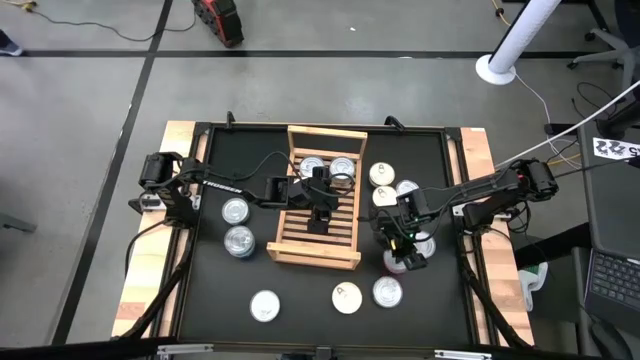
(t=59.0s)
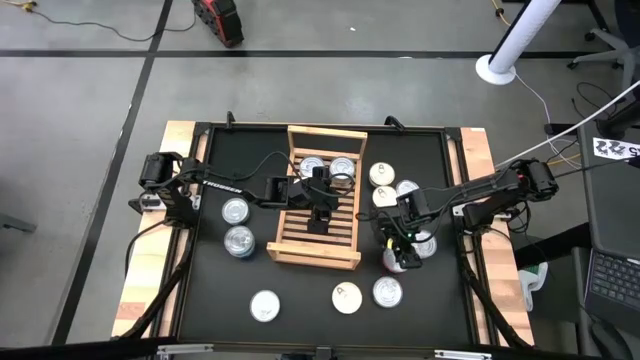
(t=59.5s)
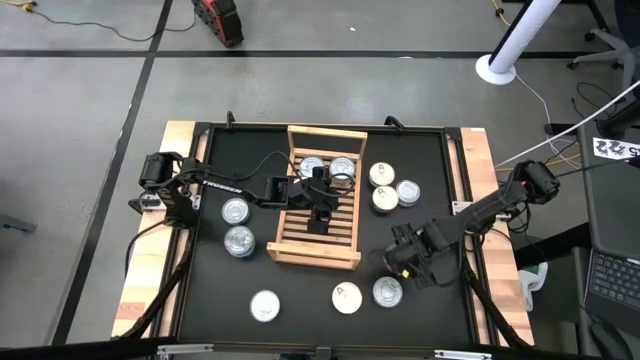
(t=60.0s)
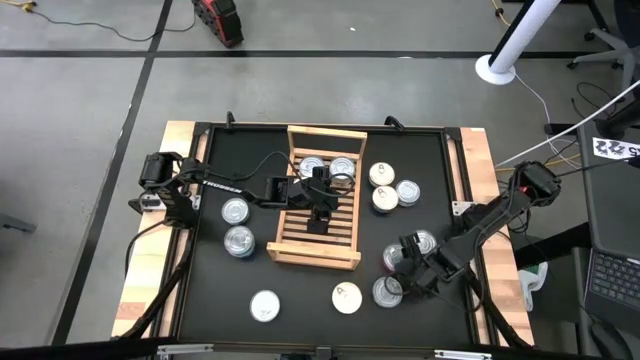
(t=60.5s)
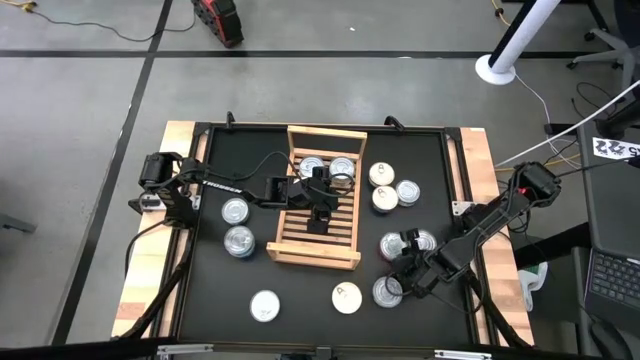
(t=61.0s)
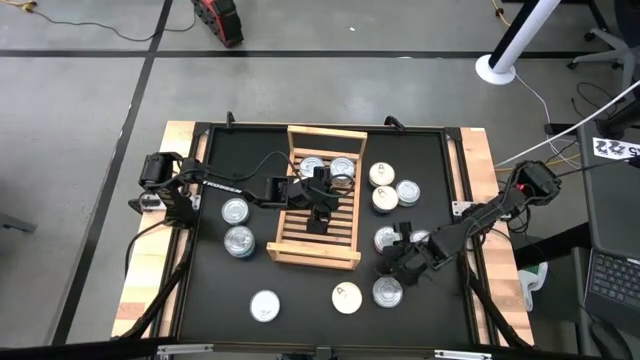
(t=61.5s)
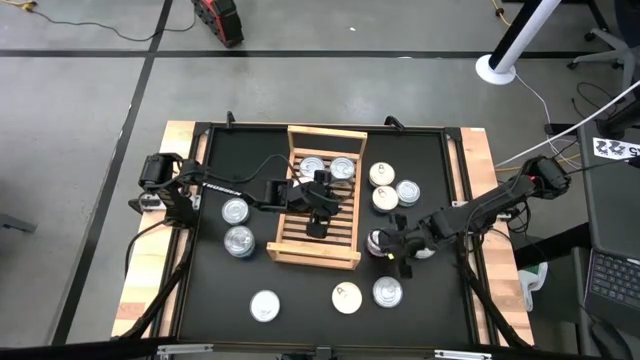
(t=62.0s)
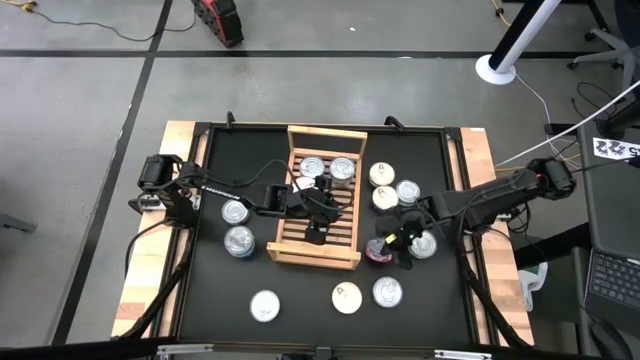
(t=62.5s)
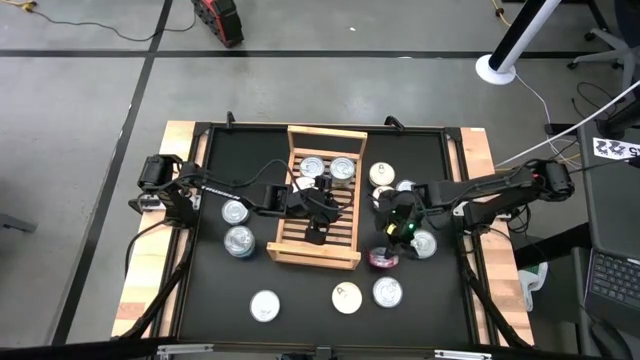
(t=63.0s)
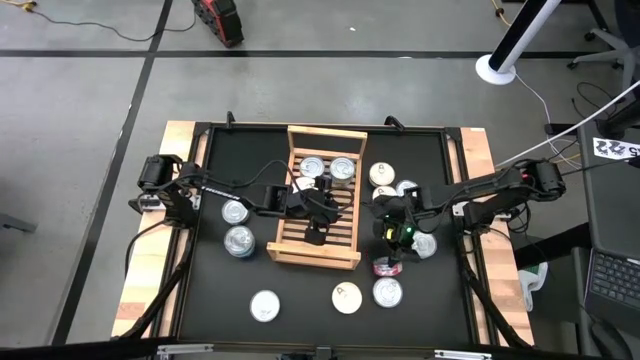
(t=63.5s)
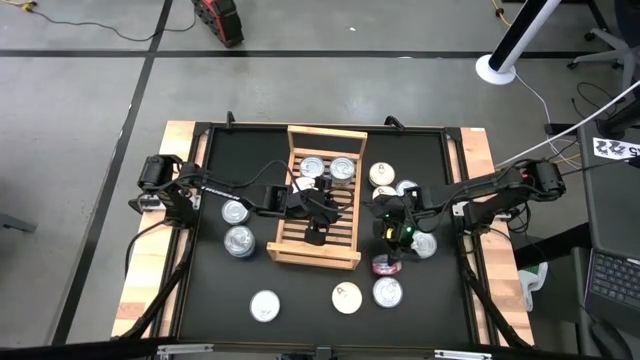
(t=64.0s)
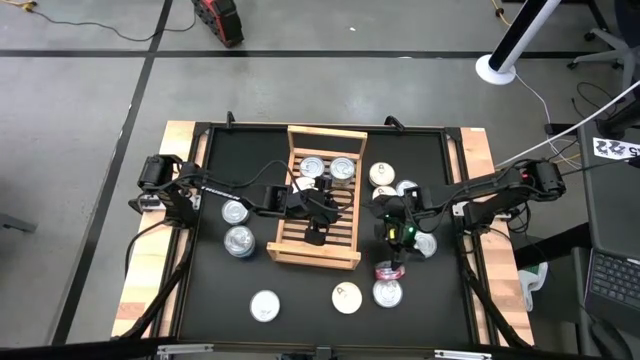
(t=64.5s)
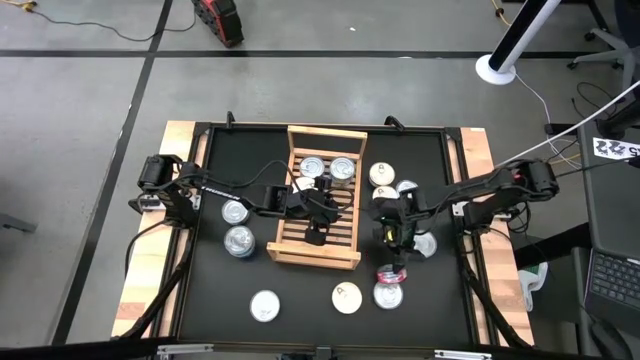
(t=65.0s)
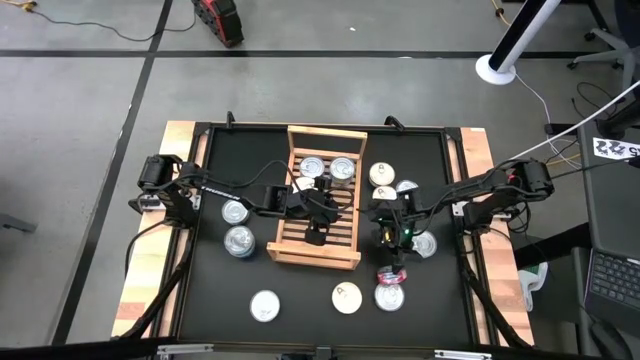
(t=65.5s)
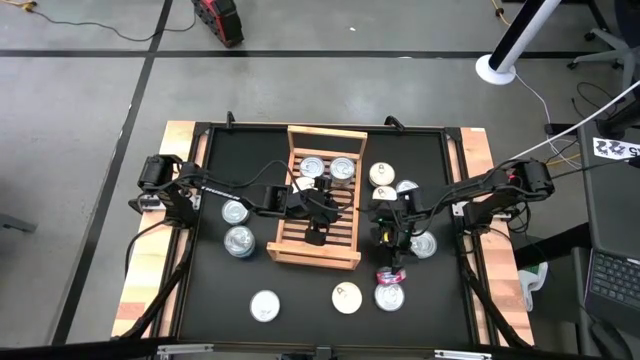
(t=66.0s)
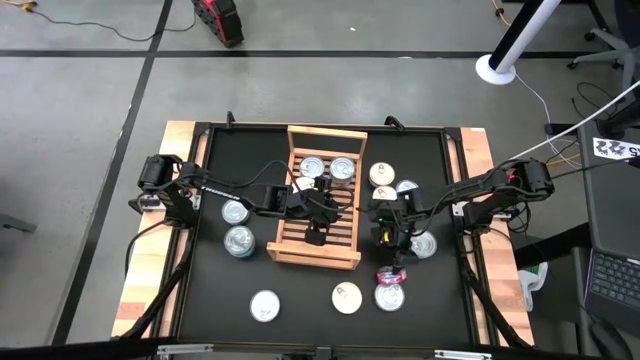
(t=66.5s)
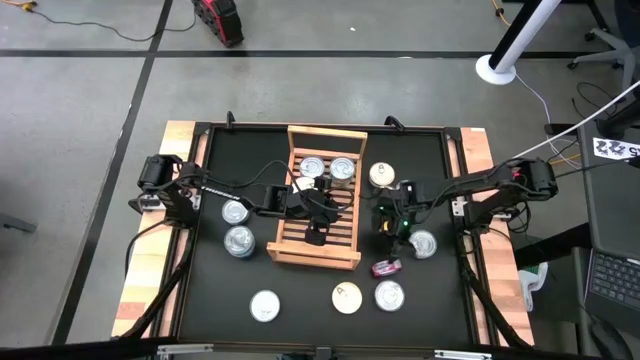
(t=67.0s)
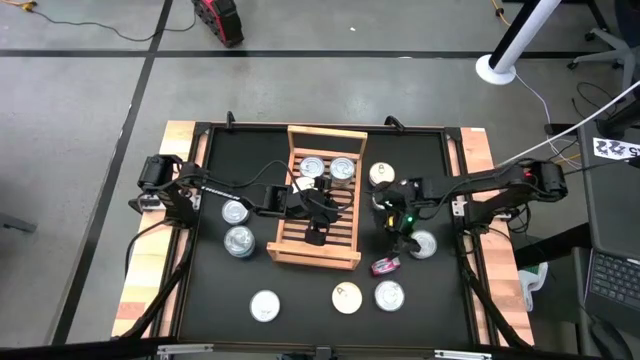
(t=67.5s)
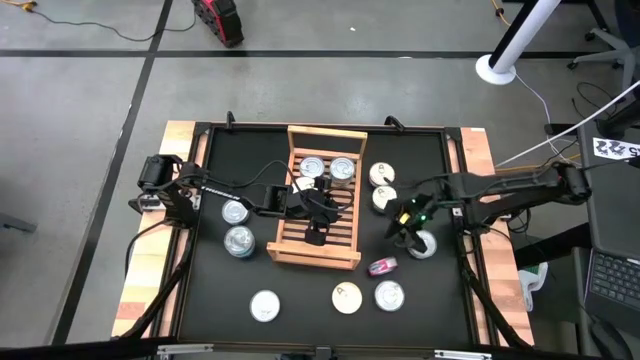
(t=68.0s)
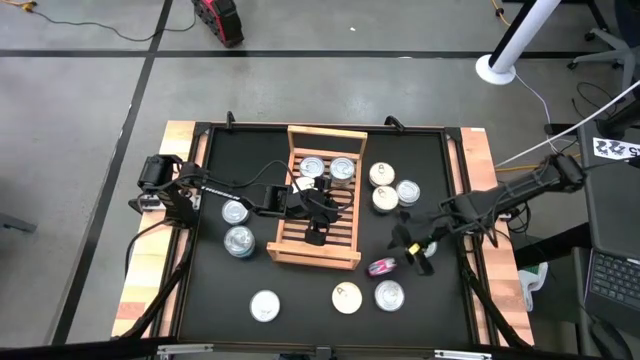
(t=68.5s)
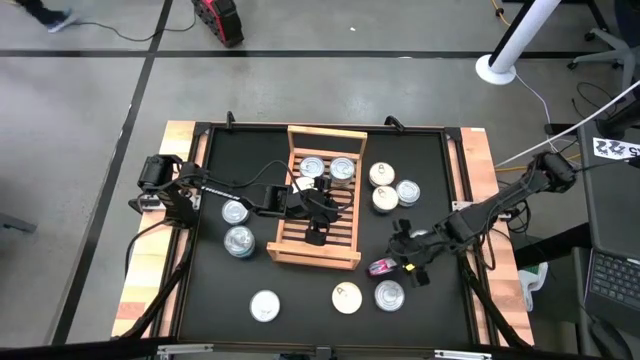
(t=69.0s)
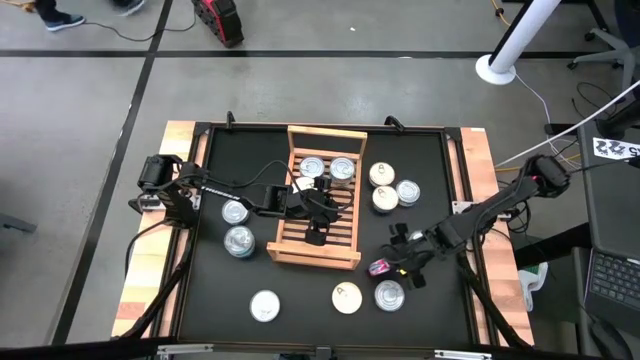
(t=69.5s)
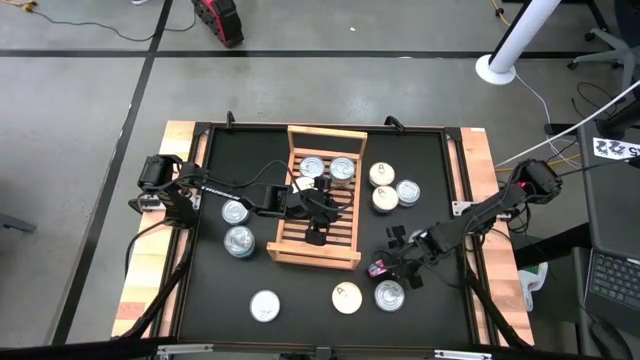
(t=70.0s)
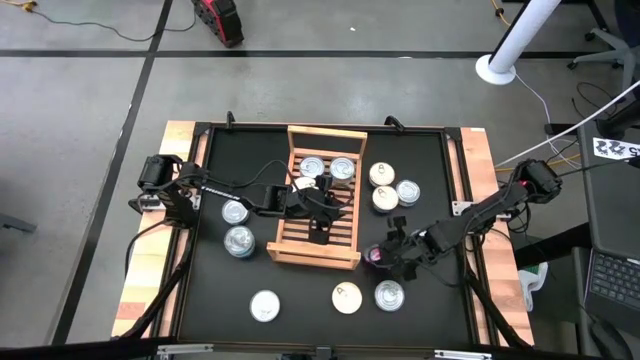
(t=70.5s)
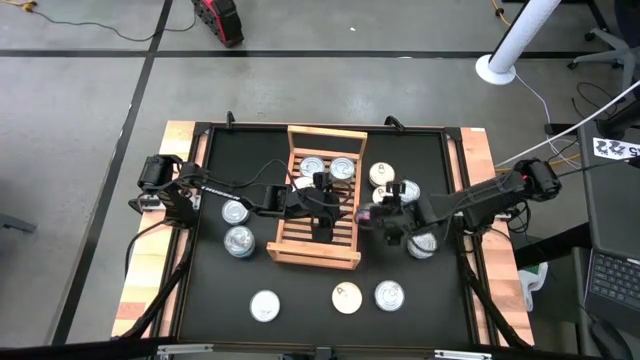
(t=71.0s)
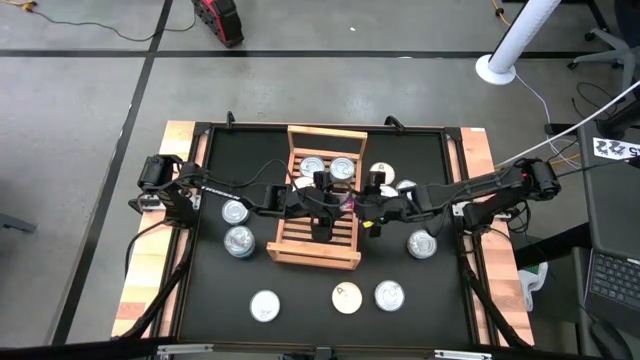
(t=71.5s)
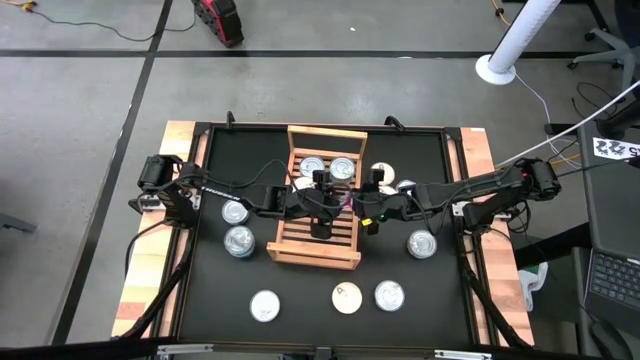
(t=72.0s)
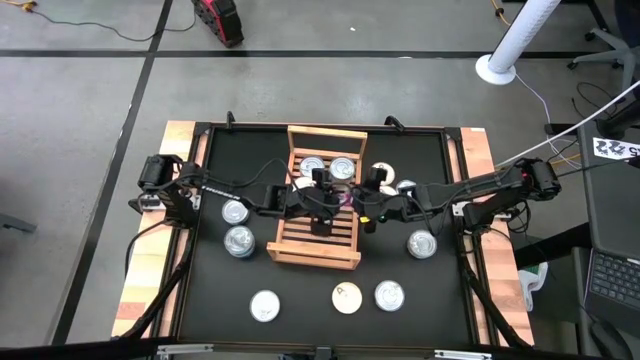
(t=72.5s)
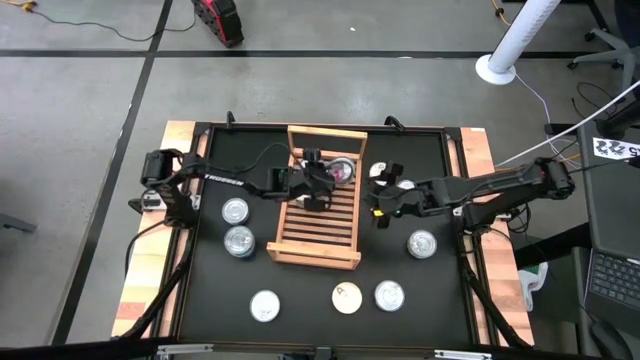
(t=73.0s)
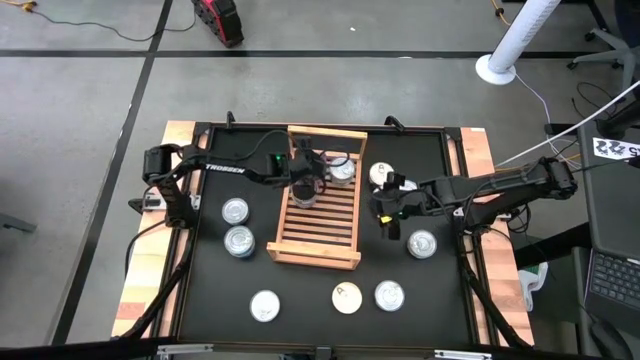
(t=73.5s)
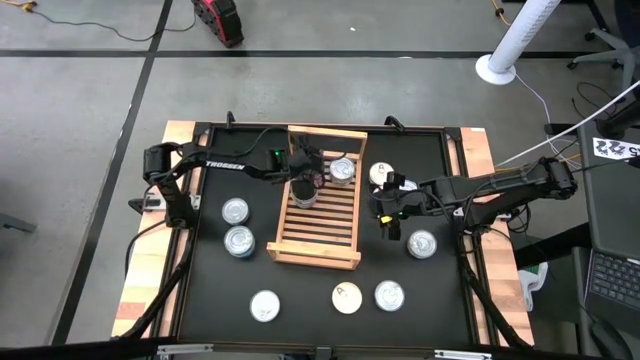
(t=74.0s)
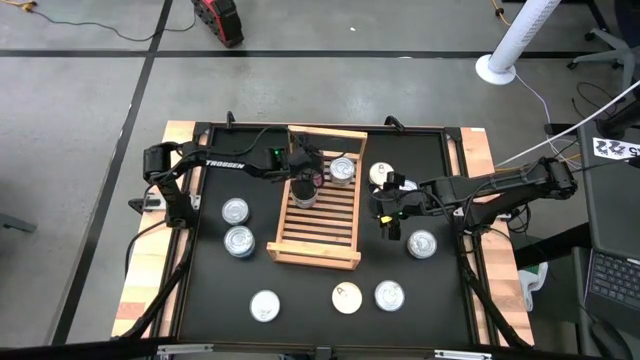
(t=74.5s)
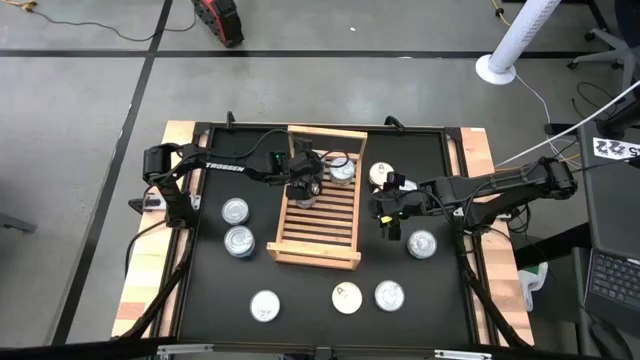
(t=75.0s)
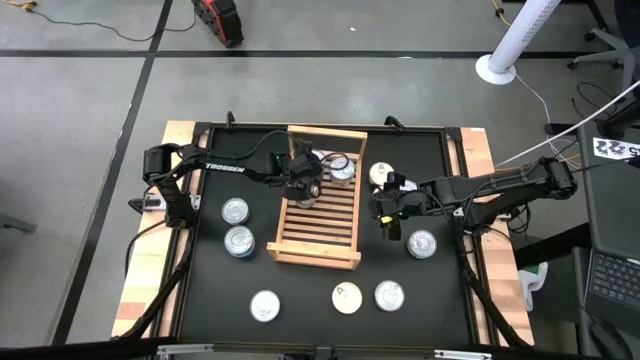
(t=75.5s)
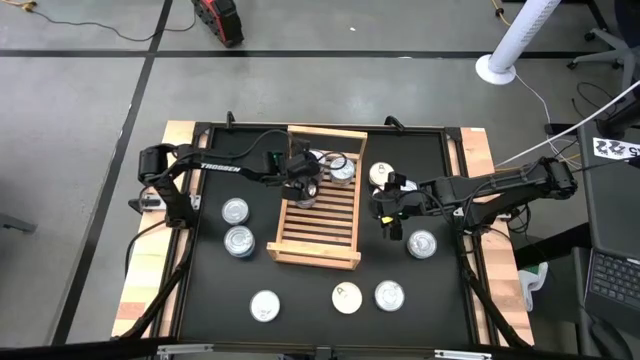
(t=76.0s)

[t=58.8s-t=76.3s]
Task: Stack canned seafood by type on shelf
Stack the red tuna can on top of the other red tuna cans on the shelf

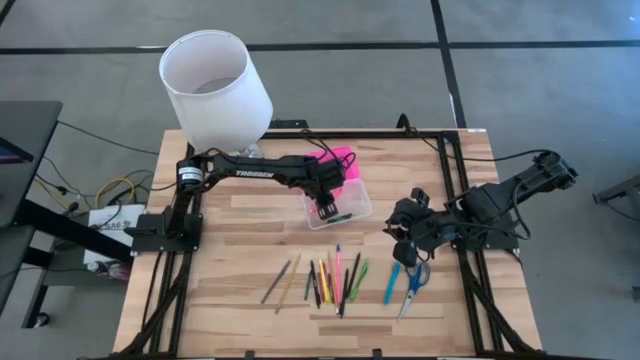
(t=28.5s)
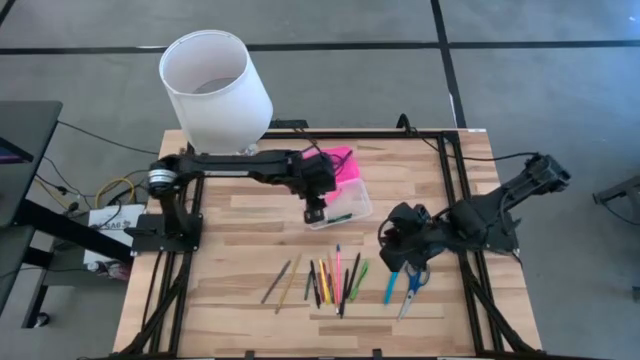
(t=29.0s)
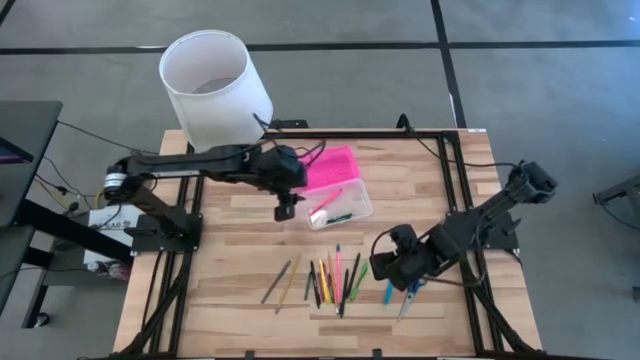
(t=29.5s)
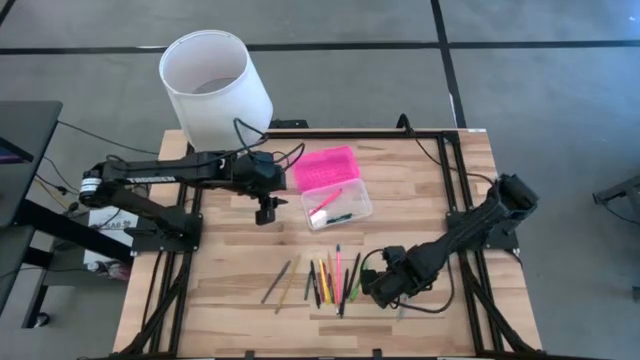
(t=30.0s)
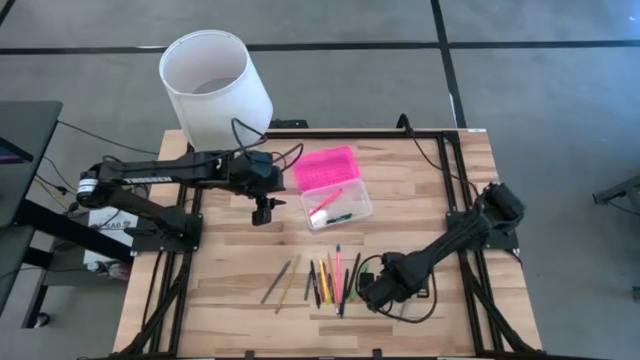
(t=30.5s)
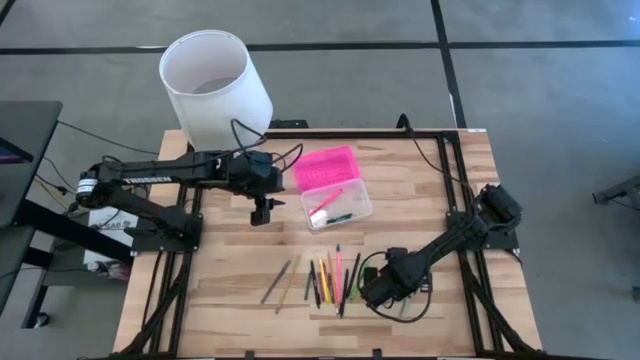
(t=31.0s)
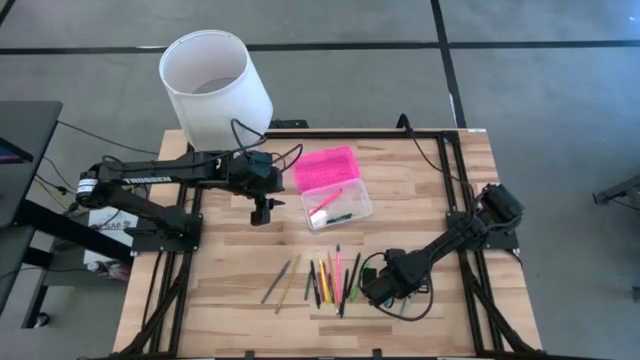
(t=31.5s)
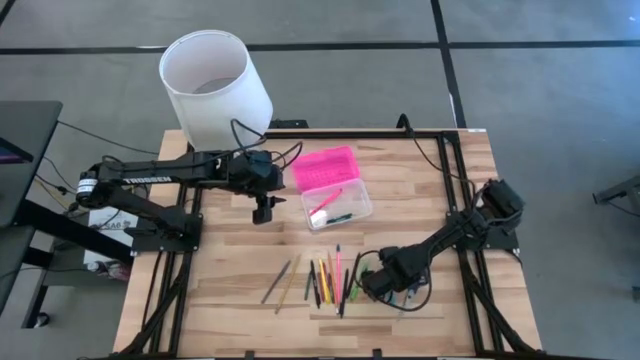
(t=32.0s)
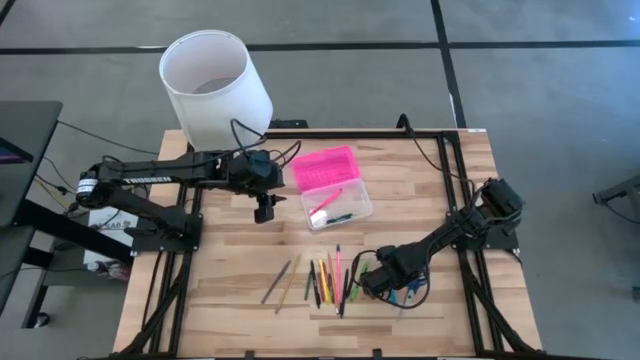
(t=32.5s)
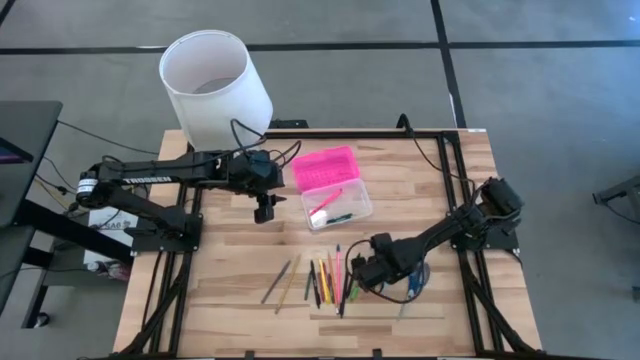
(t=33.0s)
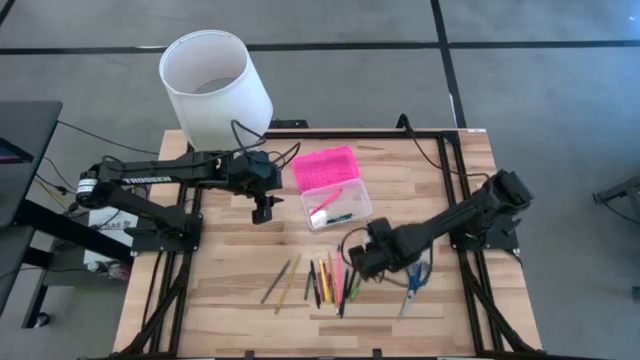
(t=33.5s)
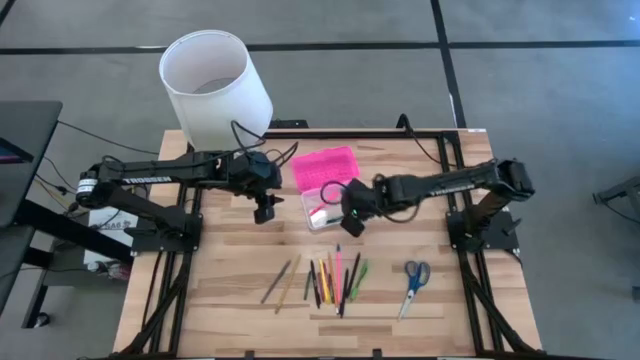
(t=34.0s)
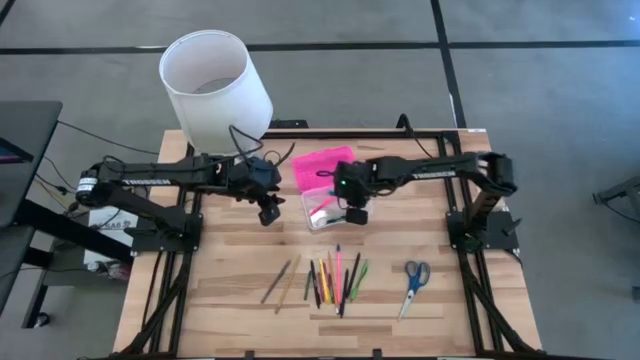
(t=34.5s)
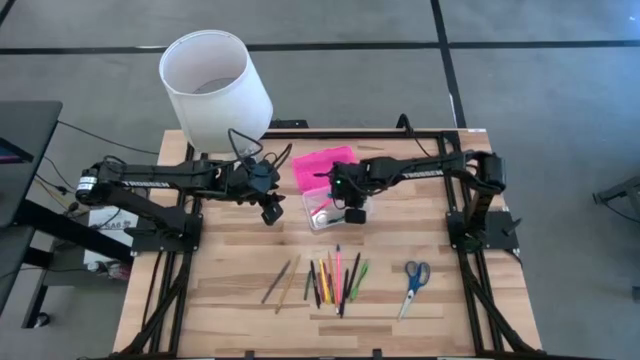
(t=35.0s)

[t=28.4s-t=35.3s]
Task: Pick & place school supplies into a supply box
Put the blue pen into the pink supply box
